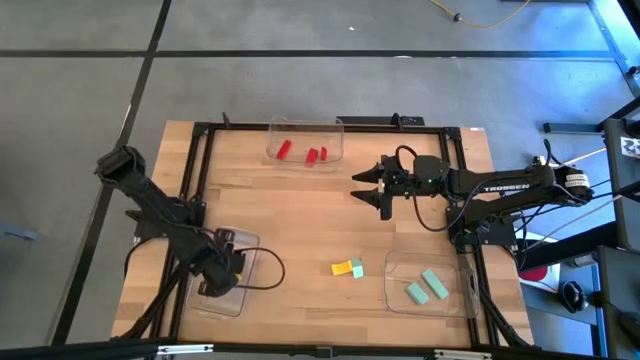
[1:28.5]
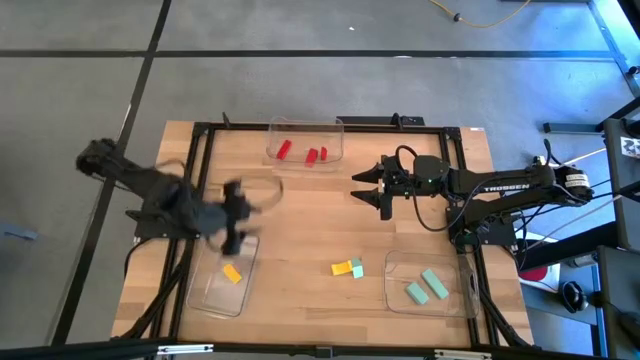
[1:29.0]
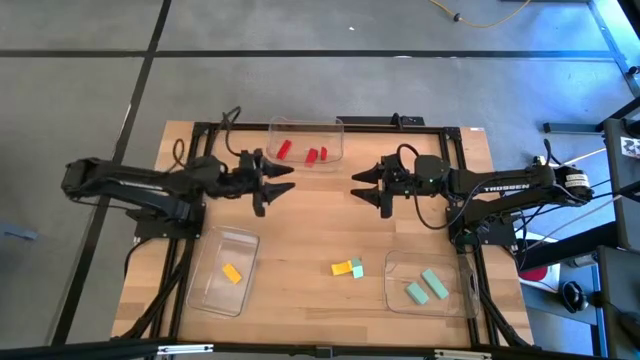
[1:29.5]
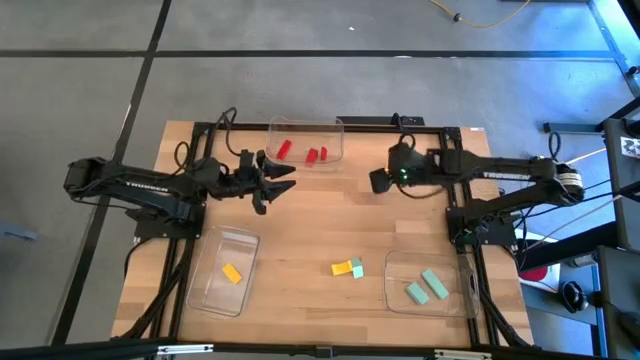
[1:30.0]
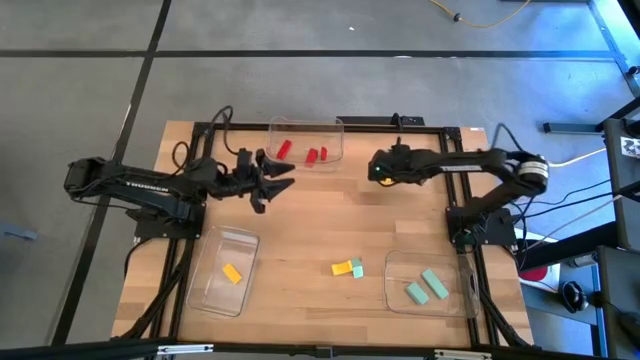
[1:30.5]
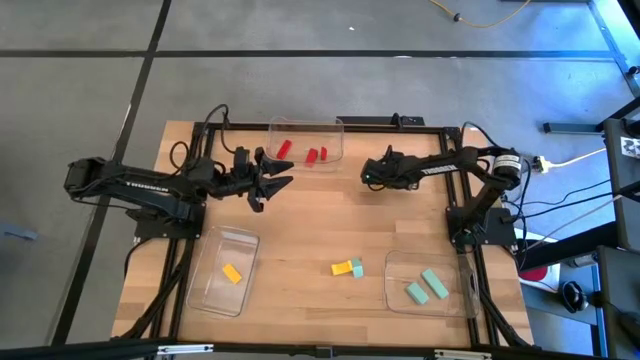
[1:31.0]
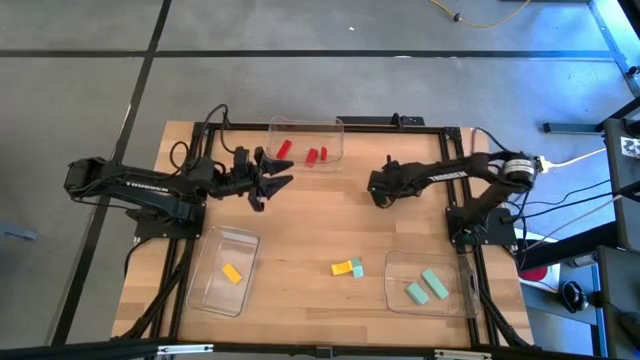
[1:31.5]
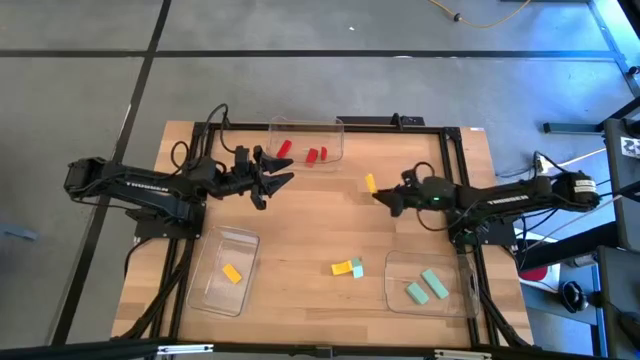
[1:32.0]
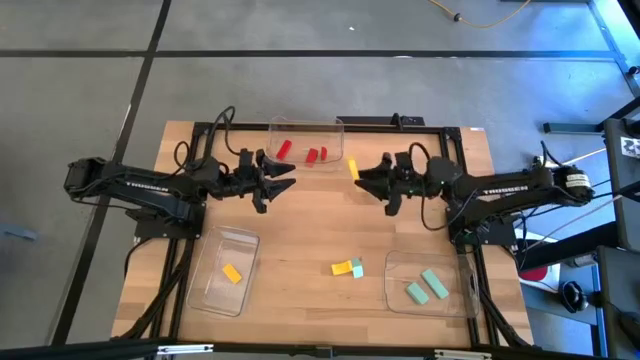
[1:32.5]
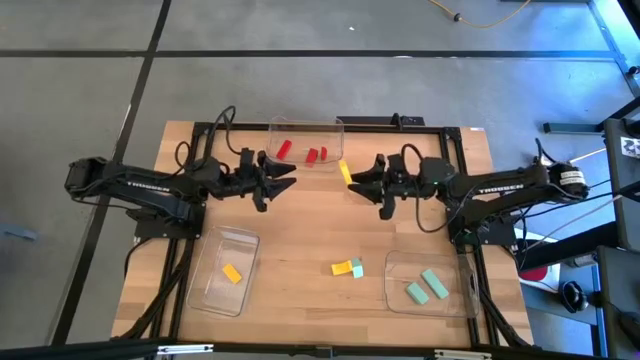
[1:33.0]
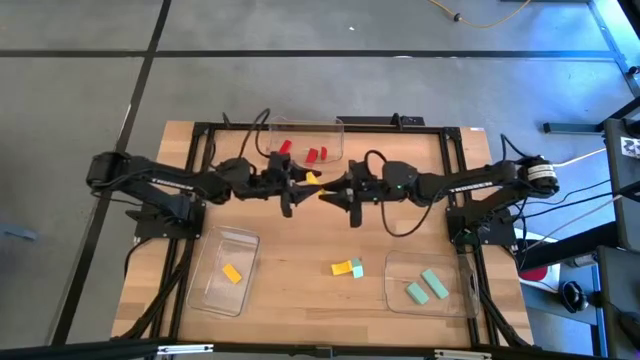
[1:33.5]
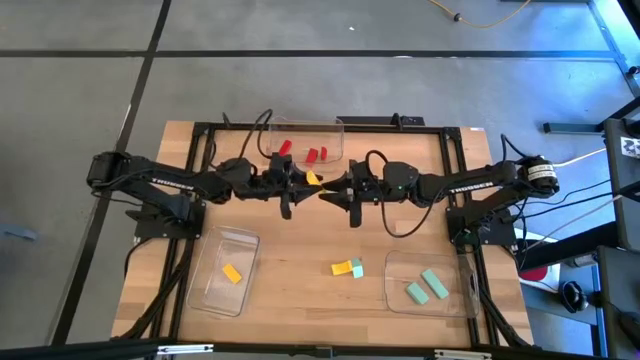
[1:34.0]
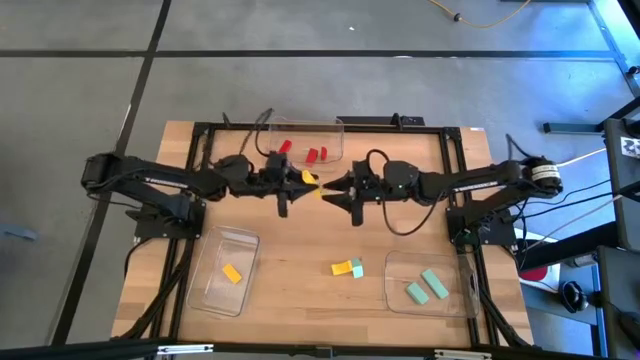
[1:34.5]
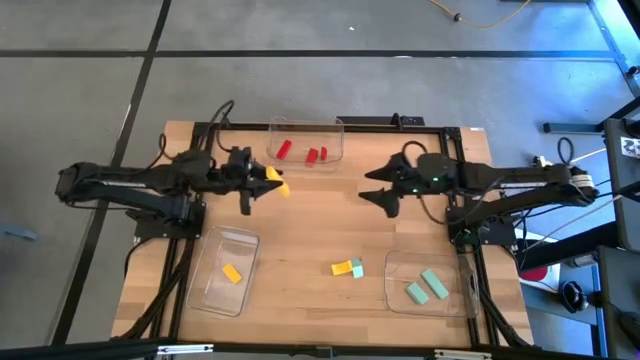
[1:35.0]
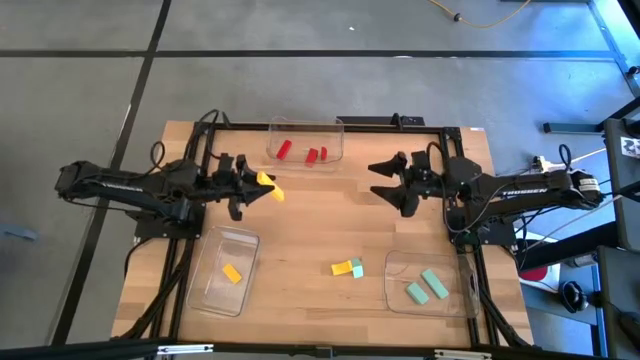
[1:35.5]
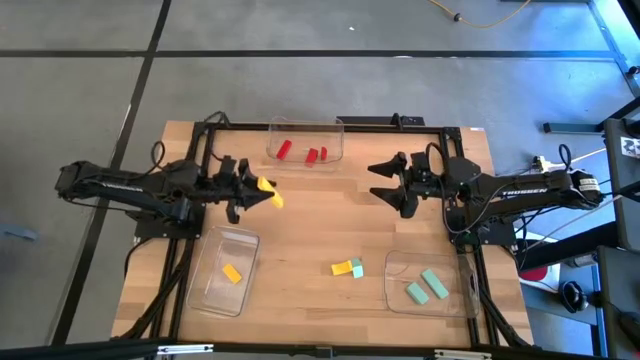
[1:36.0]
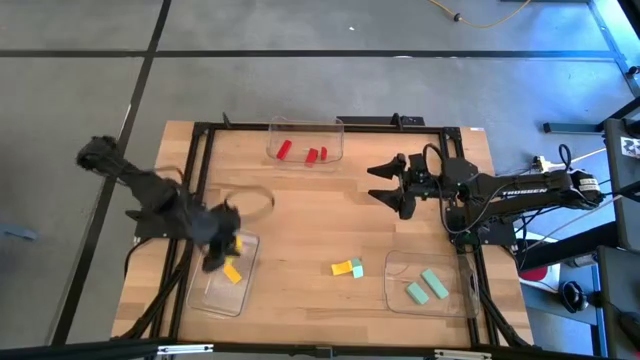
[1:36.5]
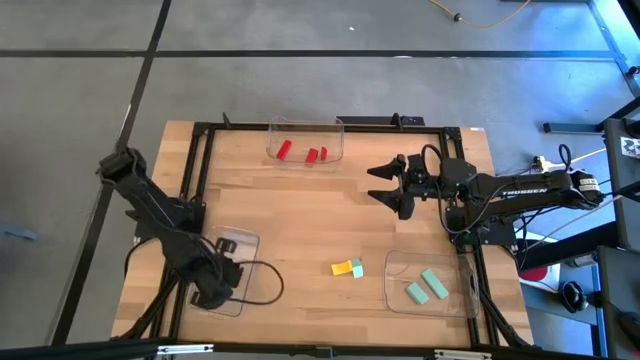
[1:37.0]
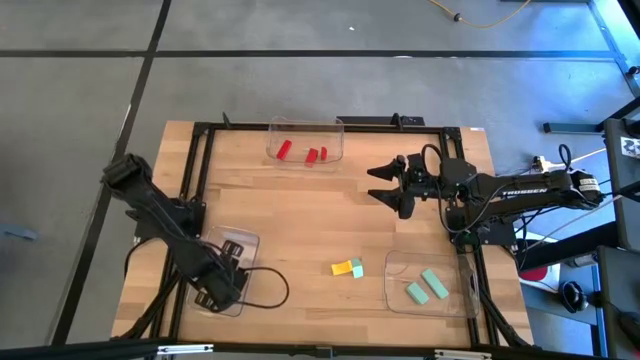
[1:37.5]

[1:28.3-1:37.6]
Task: Sort & place blocks by color
Put the top yellow block in the left transparent bin

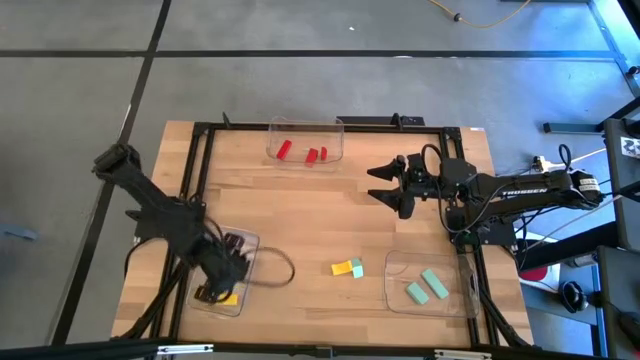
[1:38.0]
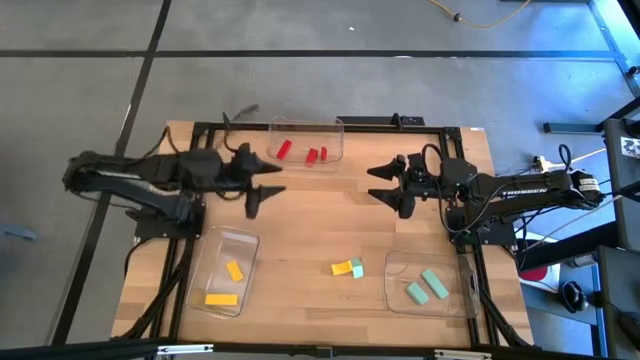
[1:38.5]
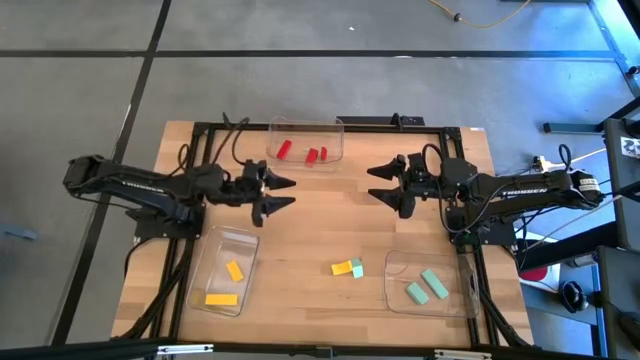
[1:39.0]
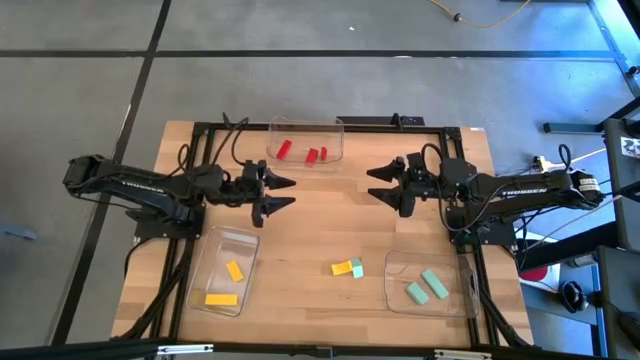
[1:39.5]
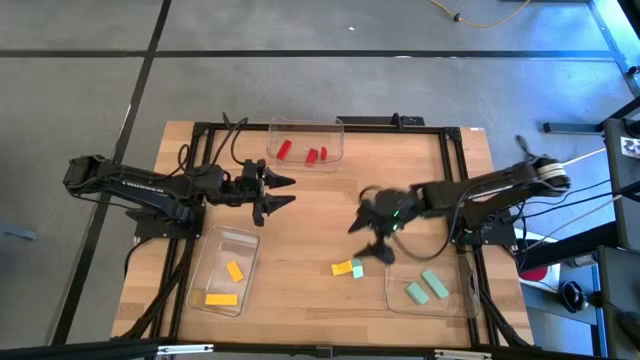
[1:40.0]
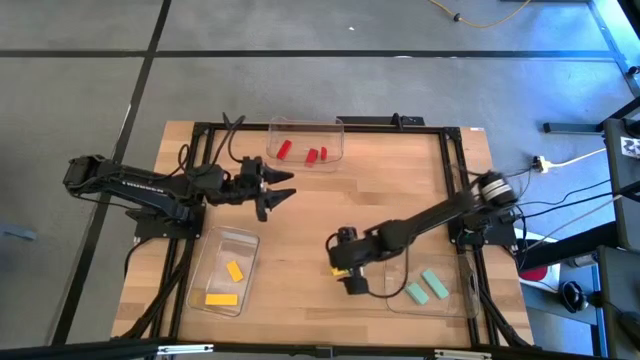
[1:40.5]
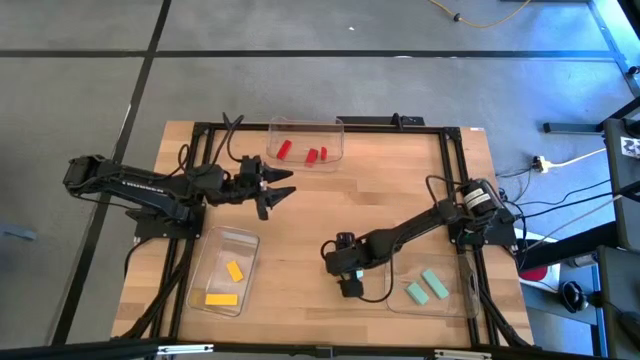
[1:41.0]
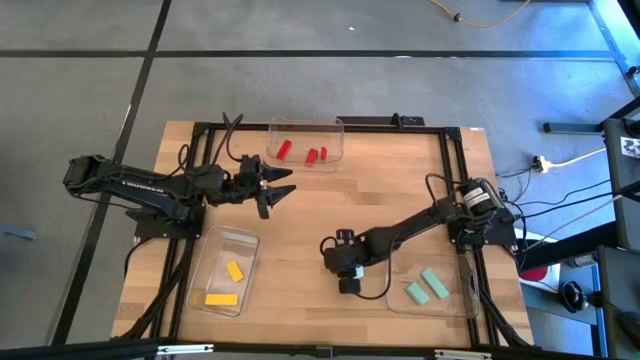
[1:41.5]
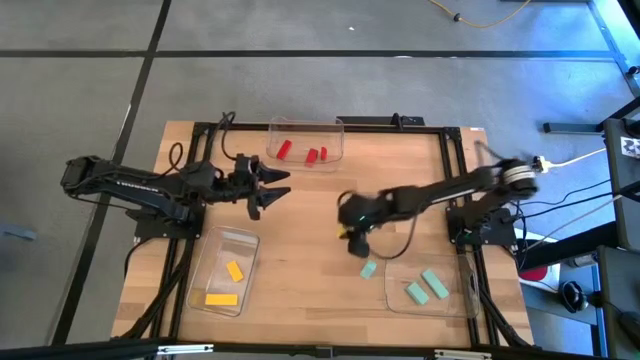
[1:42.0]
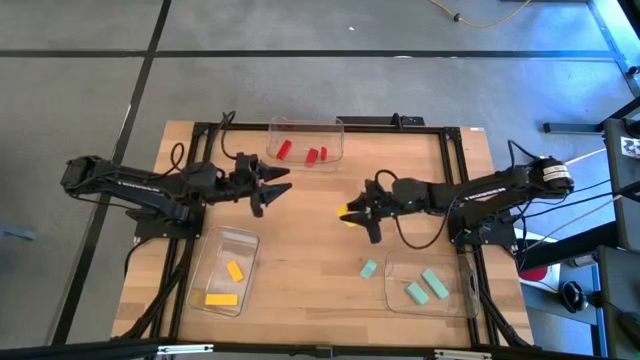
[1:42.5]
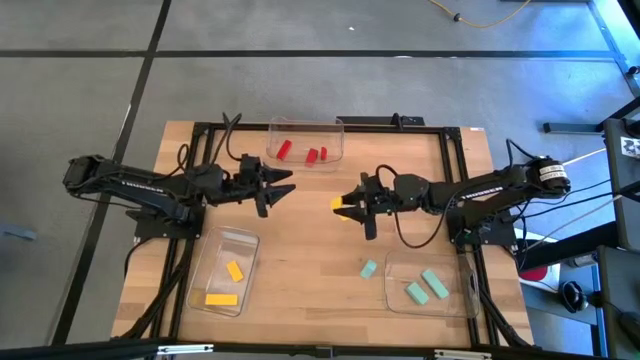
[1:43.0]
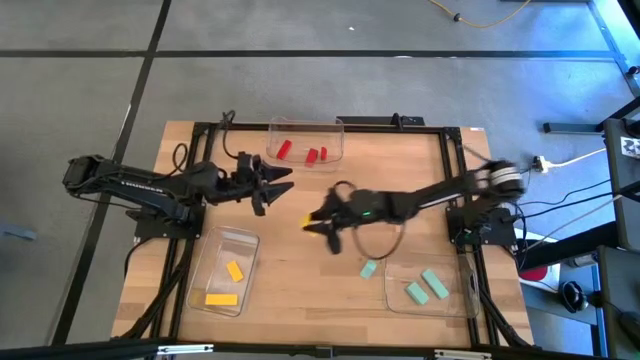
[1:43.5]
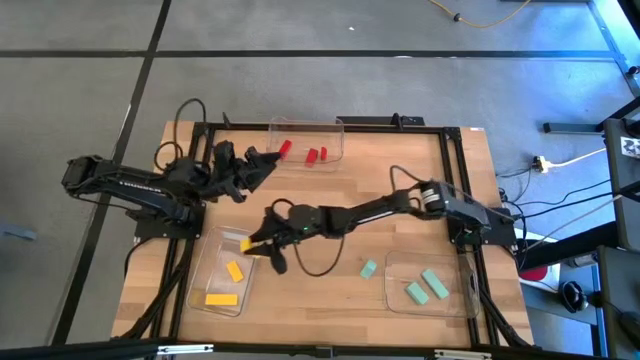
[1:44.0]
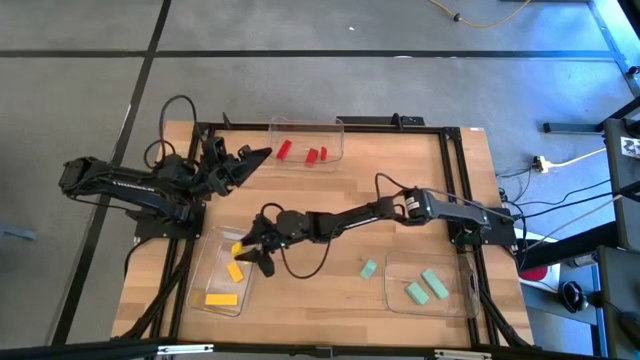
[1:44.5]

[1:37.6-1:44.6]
Put the yellow block in the left transparent bin

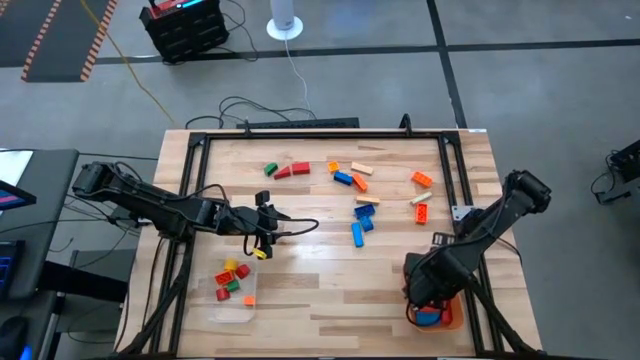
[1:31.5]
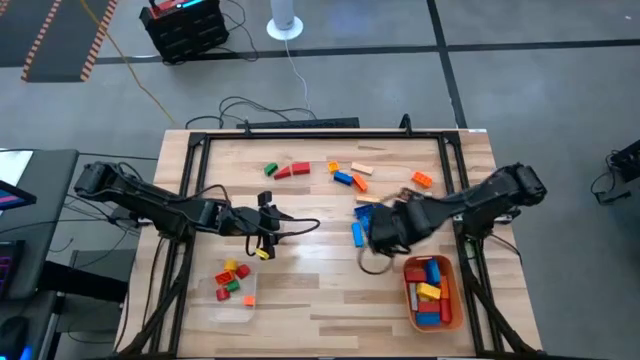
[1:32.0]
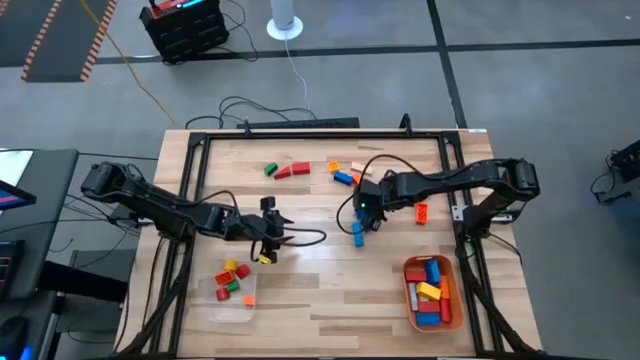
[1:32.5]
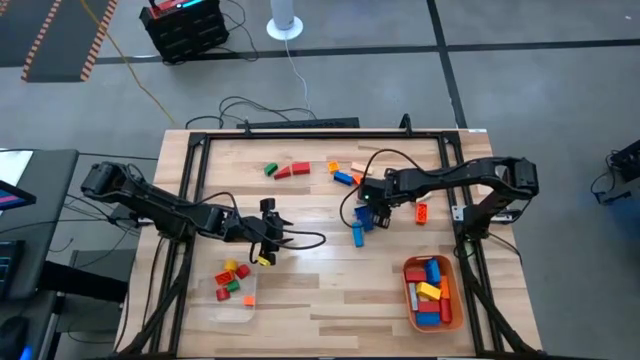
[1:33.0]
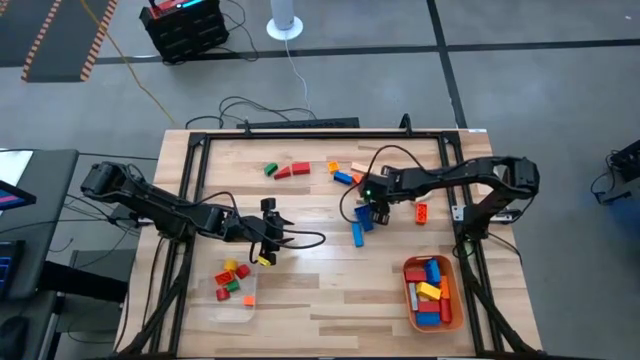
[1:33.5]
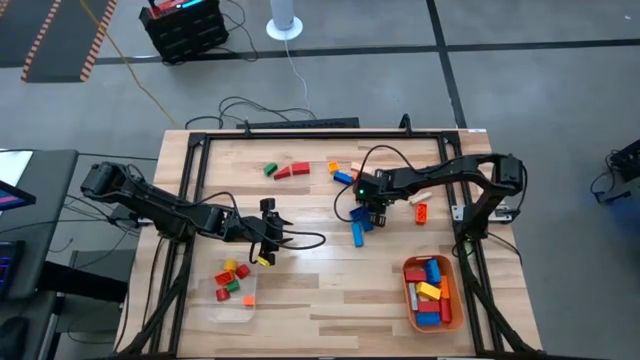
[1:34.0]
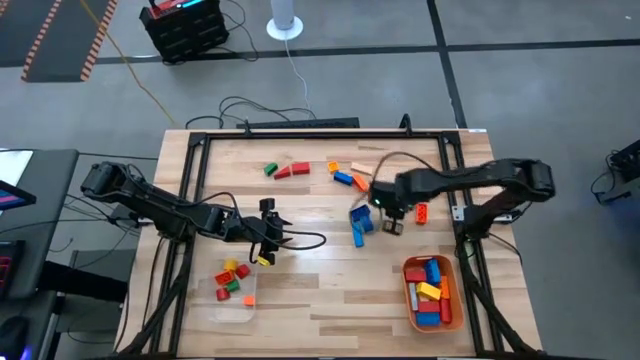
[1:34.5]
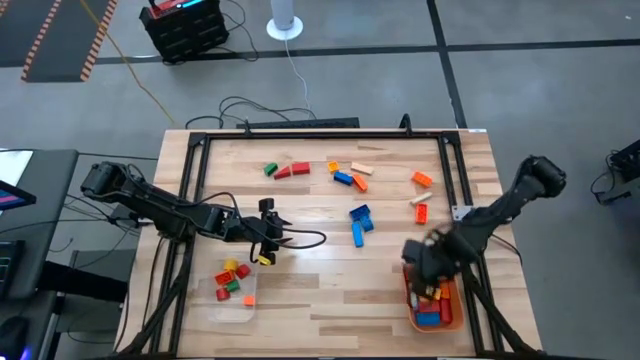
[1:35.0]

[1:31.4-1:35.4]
Task: Sort blocks by size
Put the large brown block into the orange bin

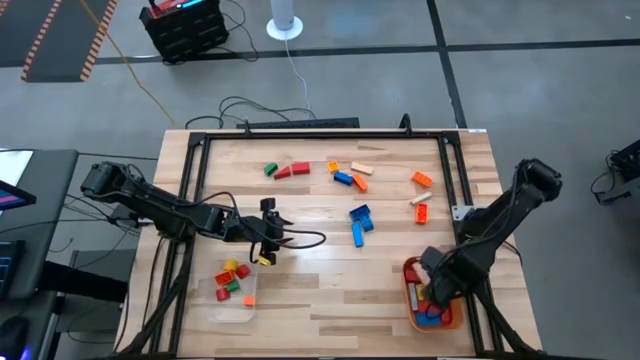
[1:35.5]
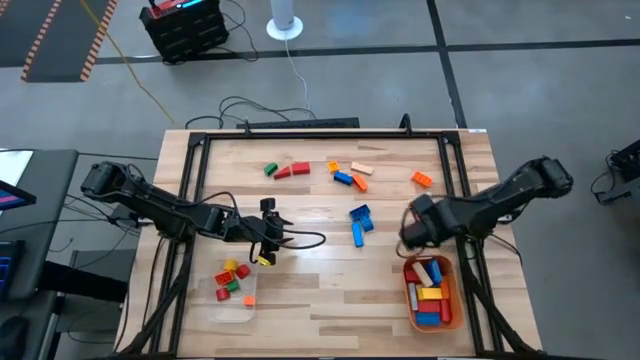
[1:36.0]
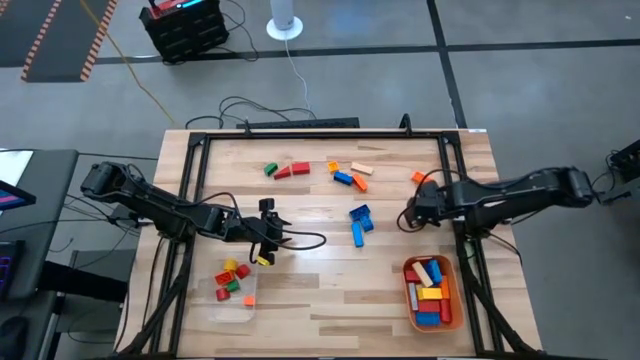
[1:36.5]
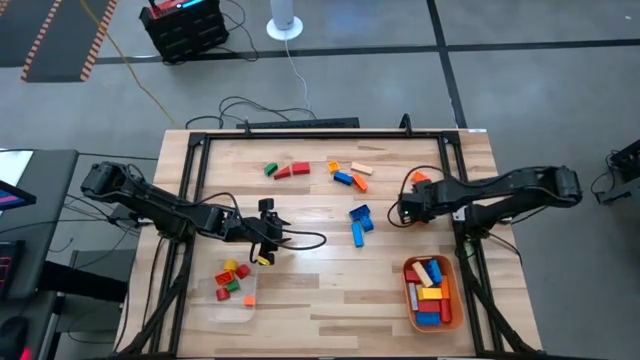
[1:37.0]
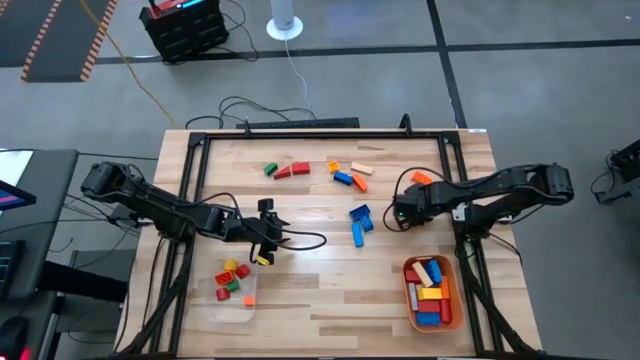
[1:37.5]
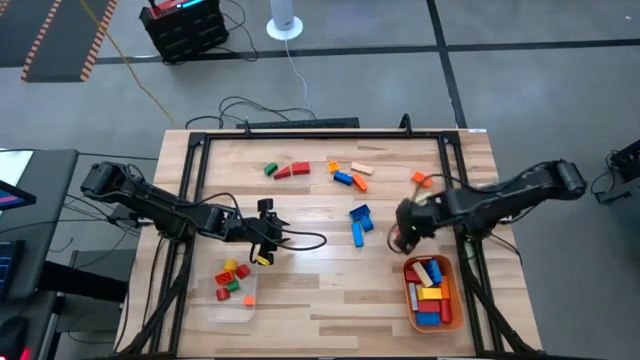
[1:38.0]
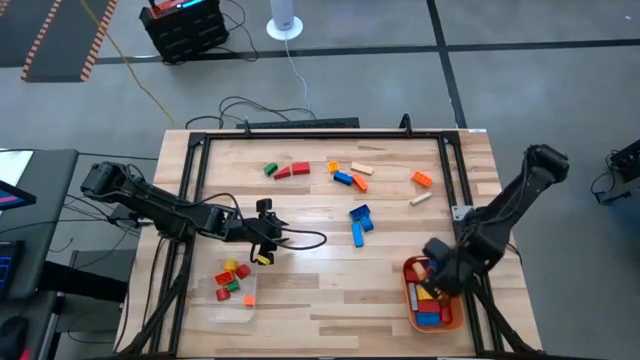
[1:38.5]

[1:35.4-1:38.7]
Put the large orange game piece into the orange bin
